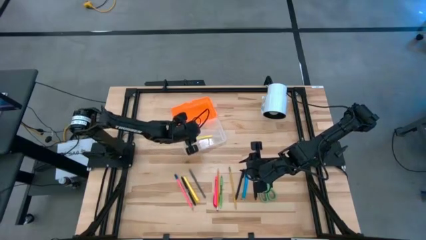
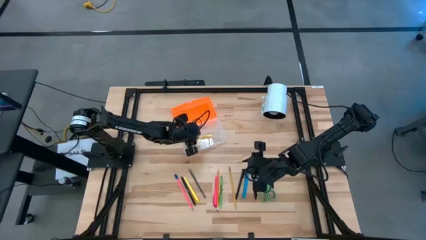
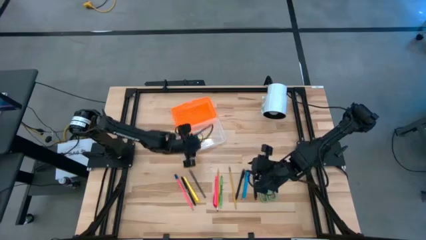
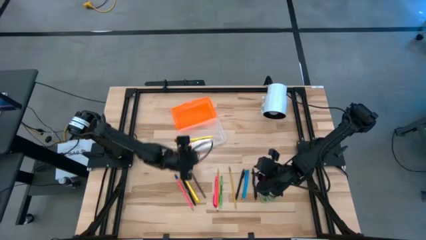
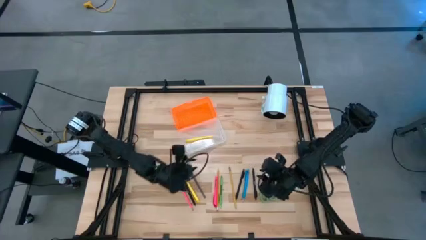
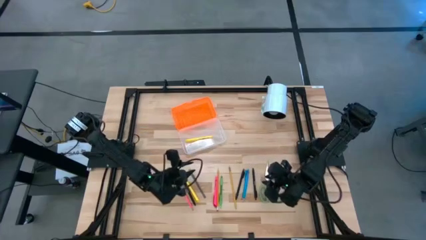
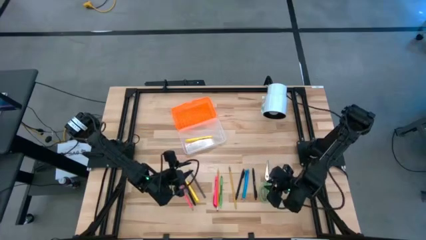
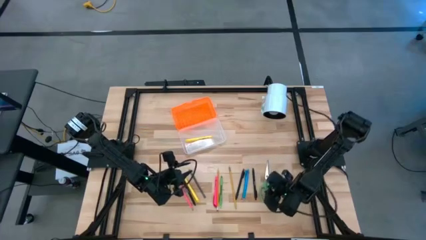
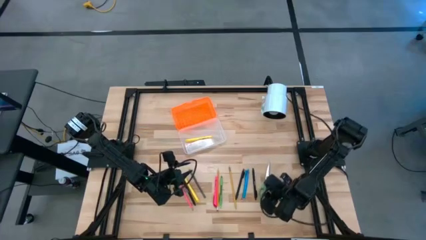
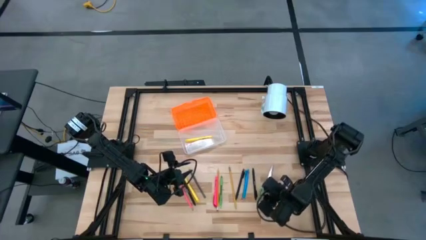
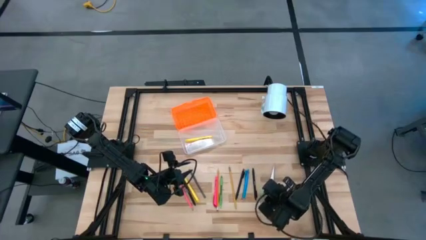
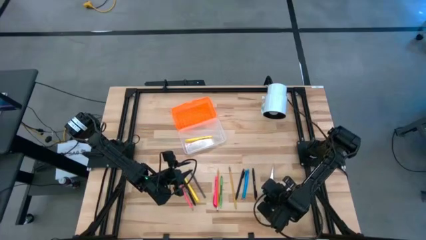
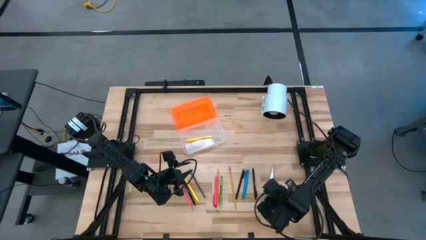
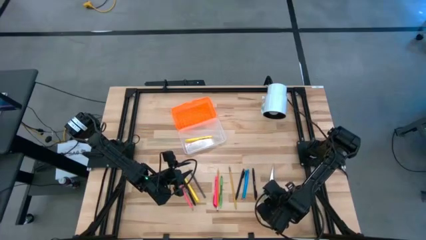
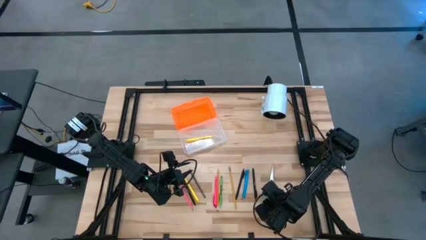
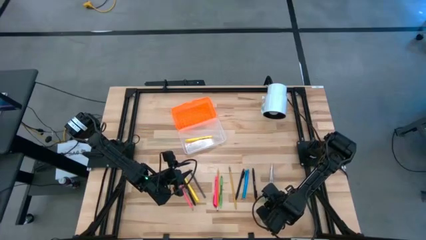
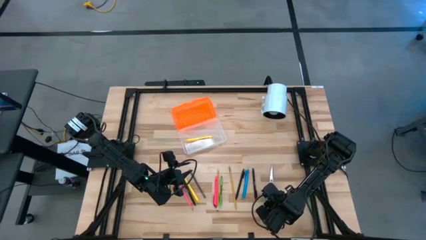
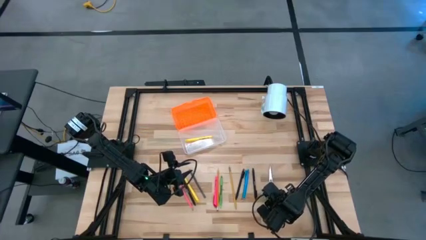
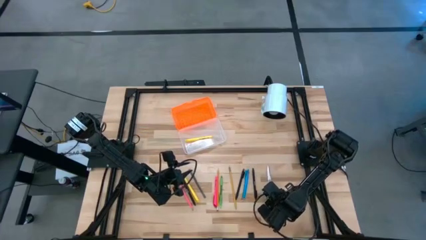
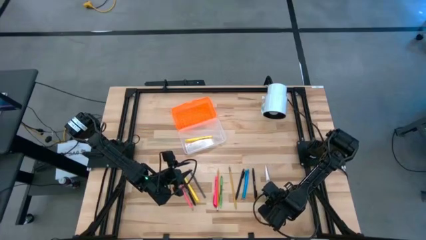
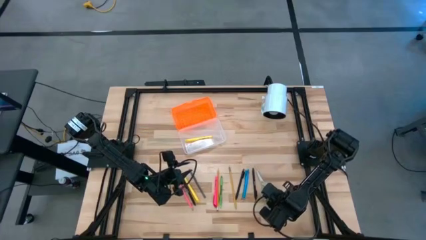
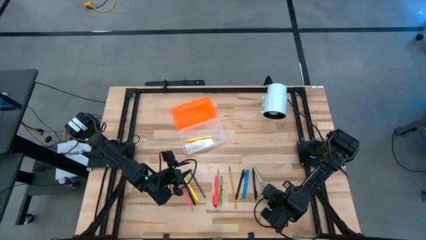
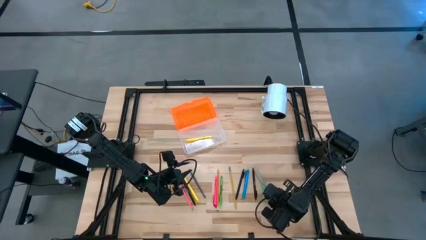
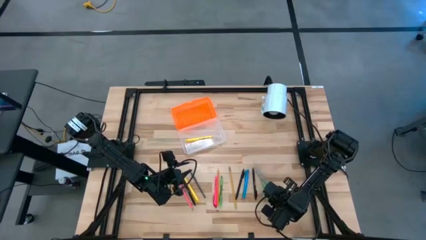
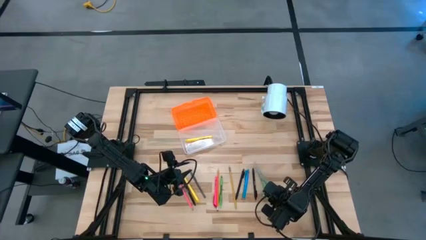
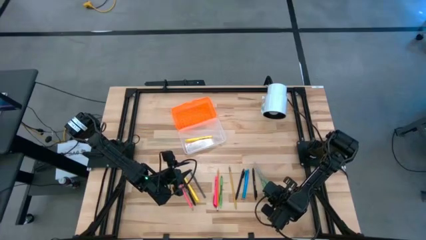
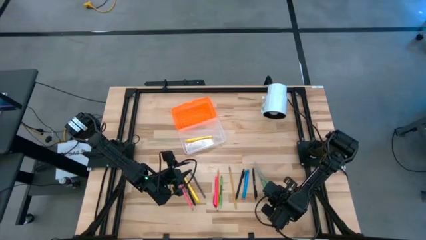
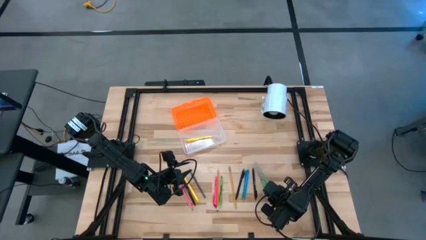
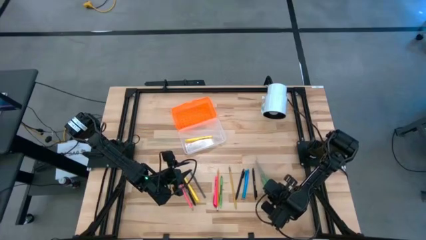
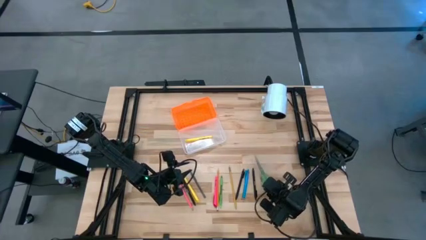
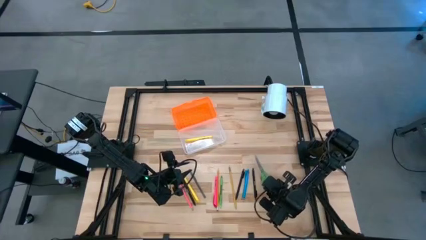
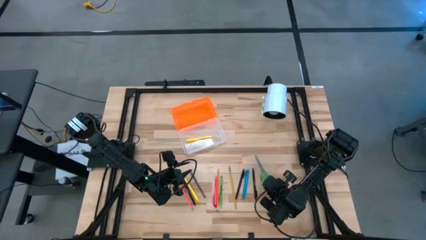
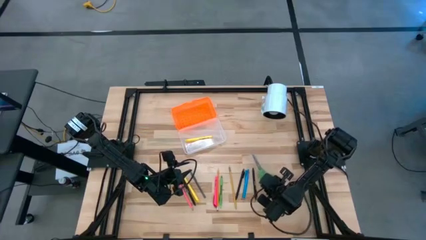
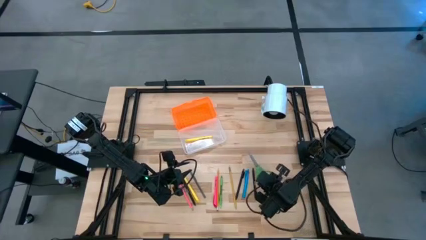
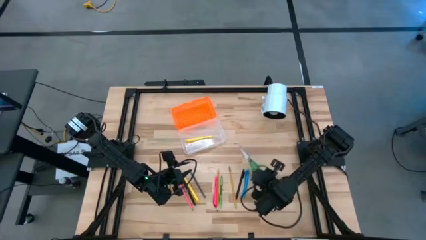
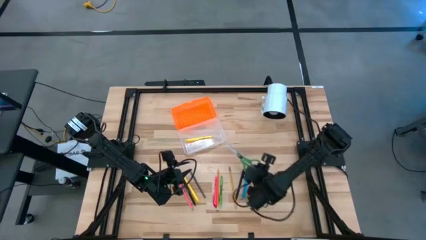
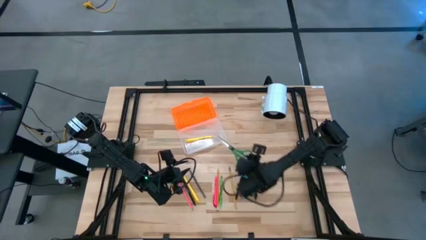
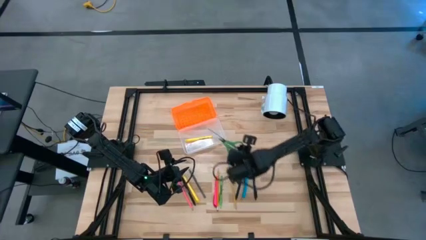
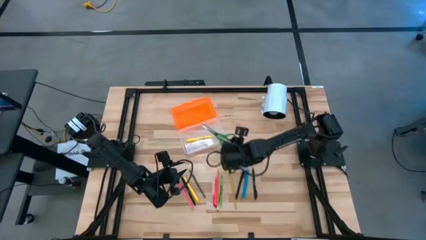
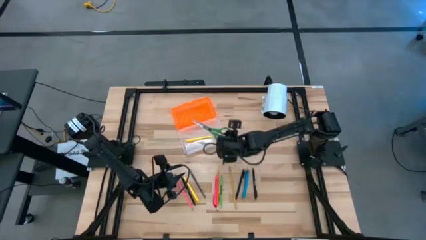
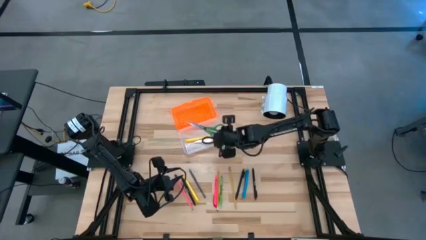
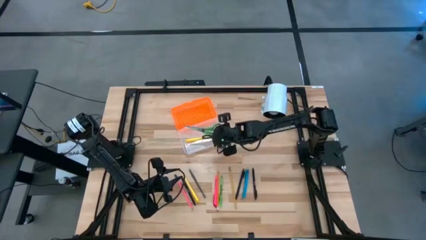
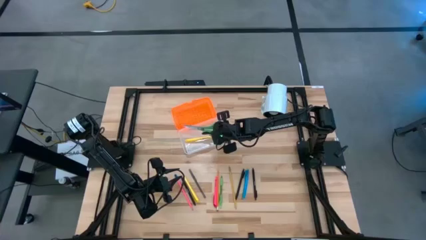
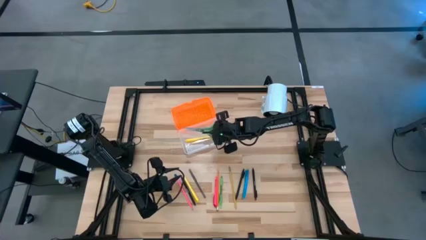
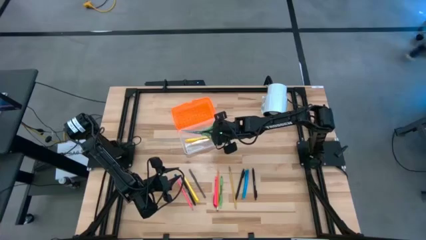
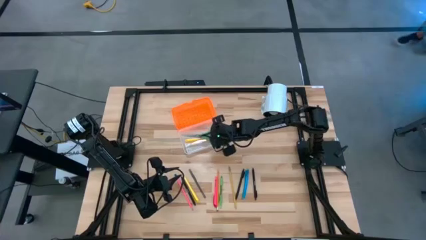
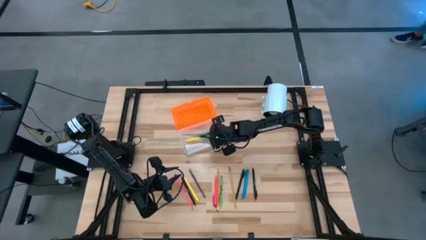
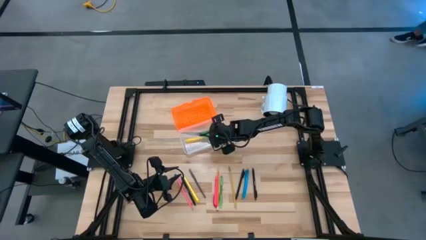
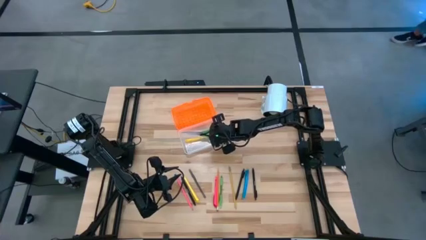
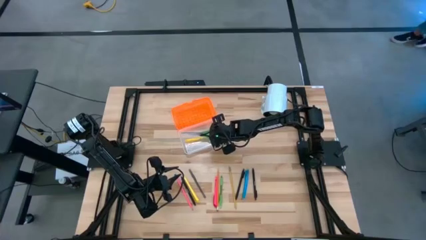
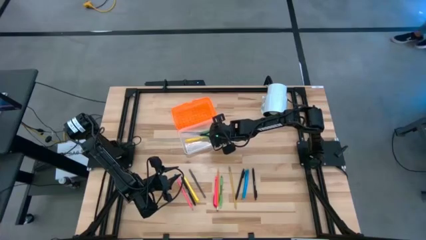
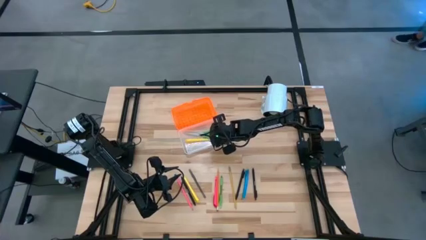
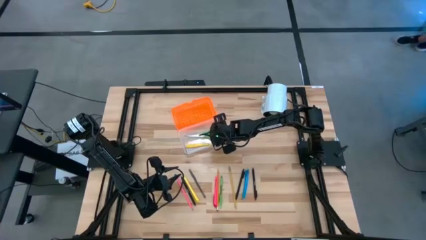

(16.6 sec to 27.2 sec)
Task: Pick & place school supplies into a supply box
Put the green scissors into the supply box
